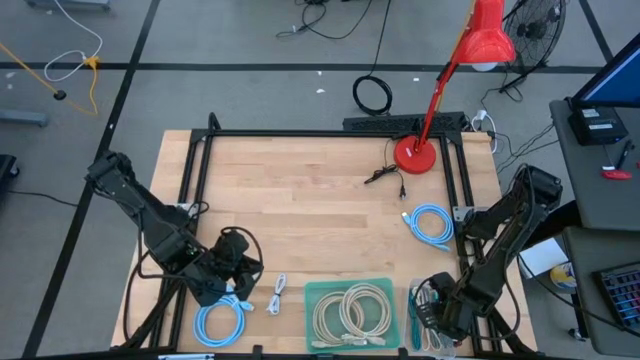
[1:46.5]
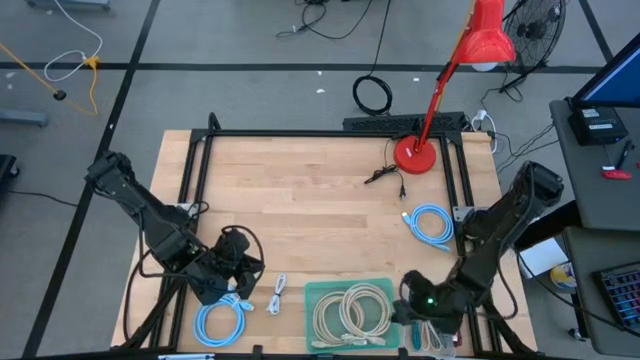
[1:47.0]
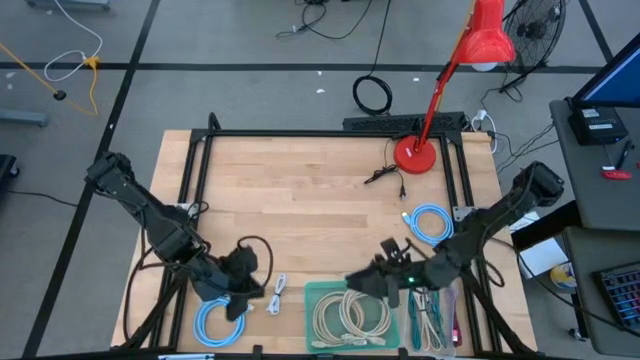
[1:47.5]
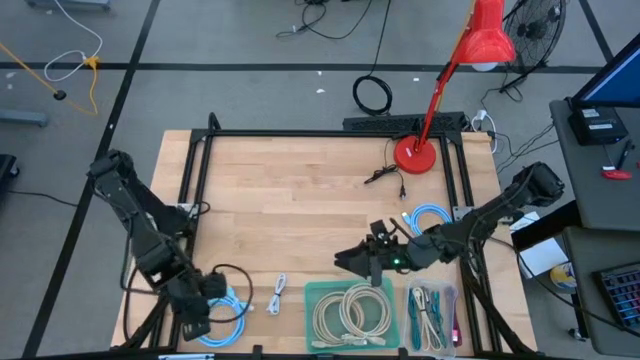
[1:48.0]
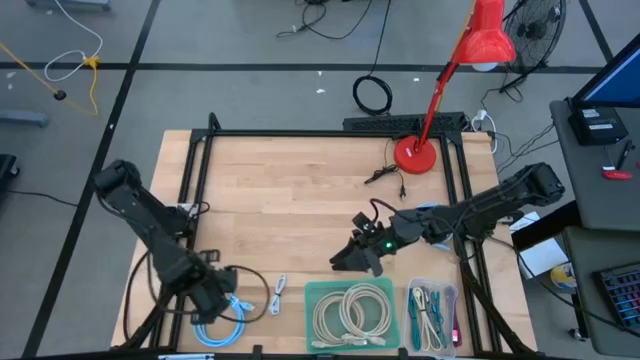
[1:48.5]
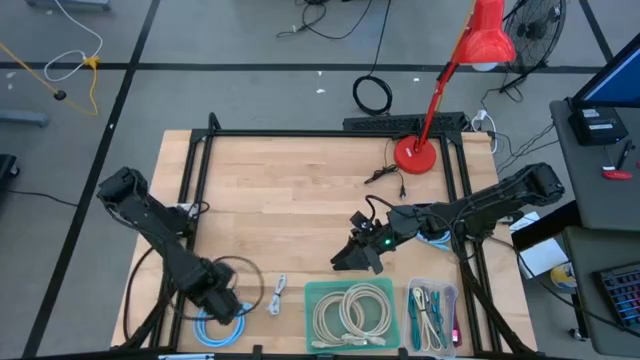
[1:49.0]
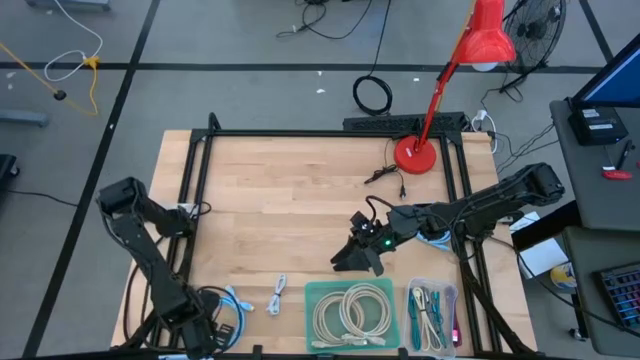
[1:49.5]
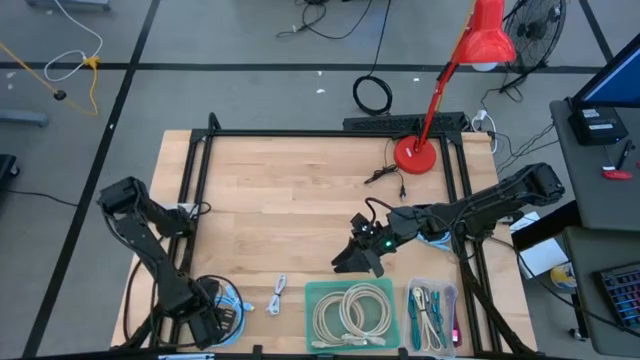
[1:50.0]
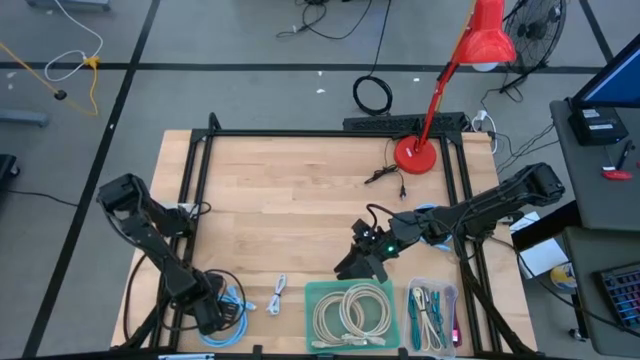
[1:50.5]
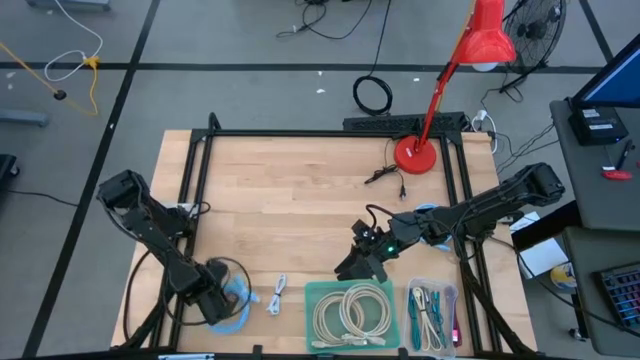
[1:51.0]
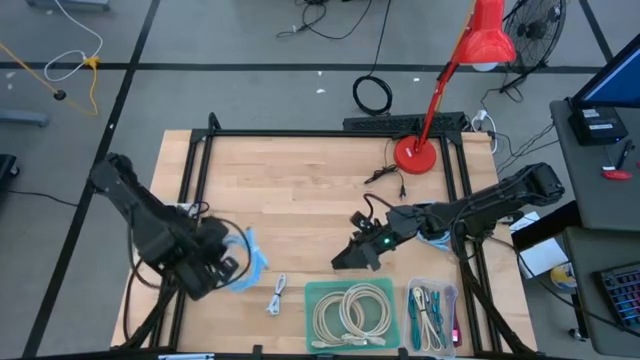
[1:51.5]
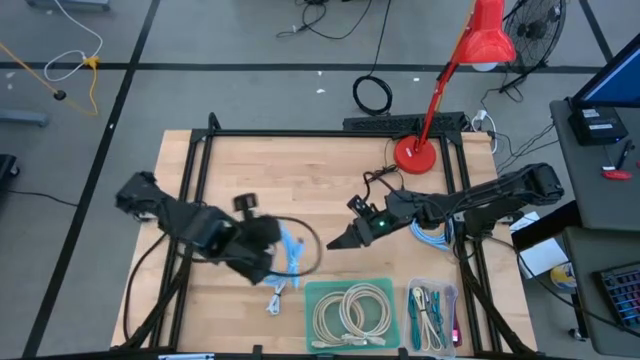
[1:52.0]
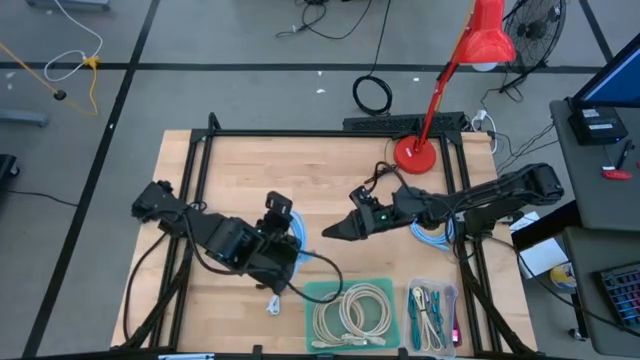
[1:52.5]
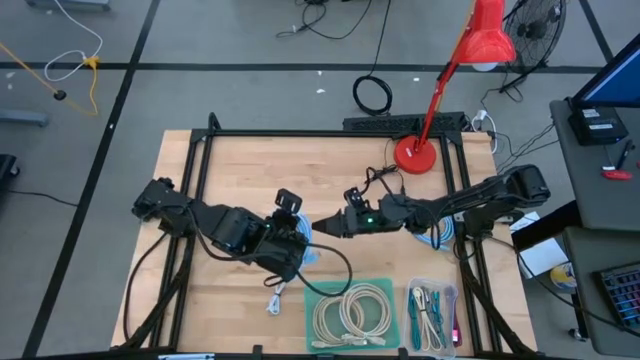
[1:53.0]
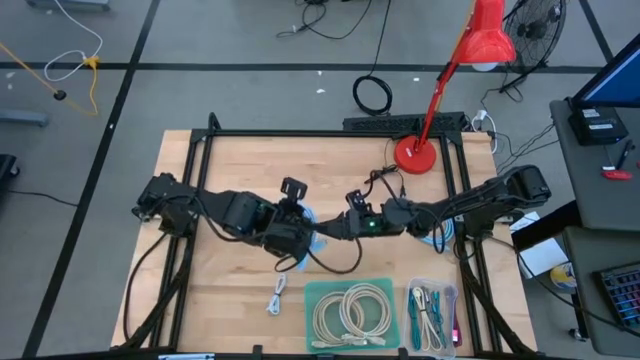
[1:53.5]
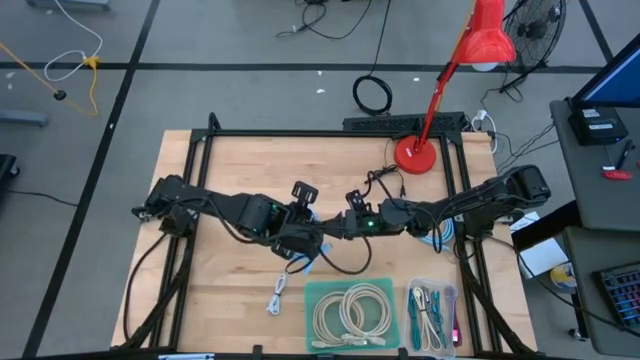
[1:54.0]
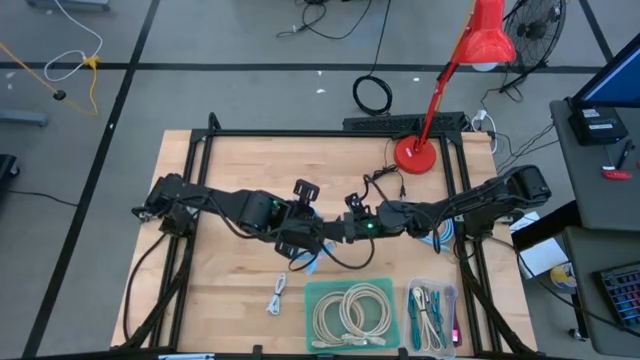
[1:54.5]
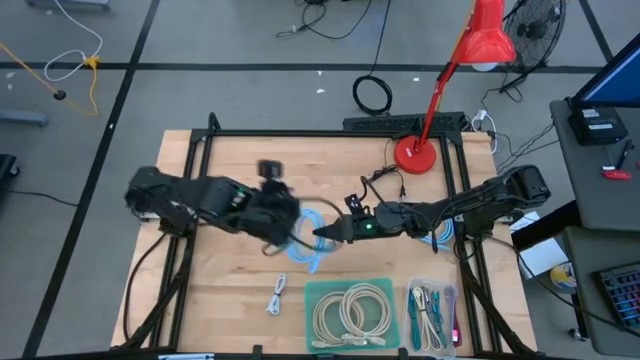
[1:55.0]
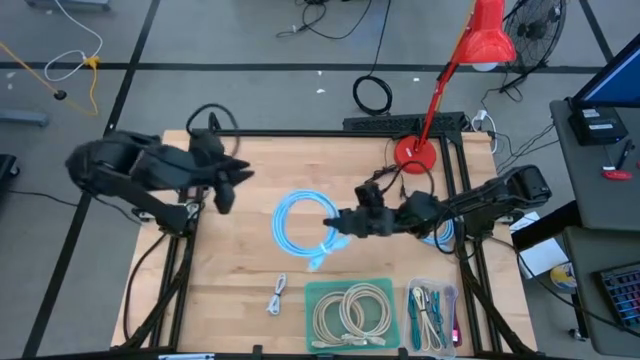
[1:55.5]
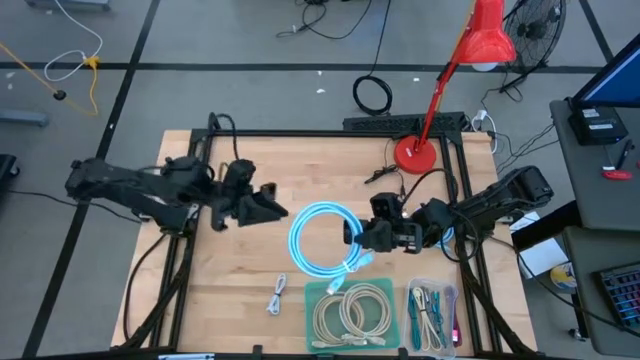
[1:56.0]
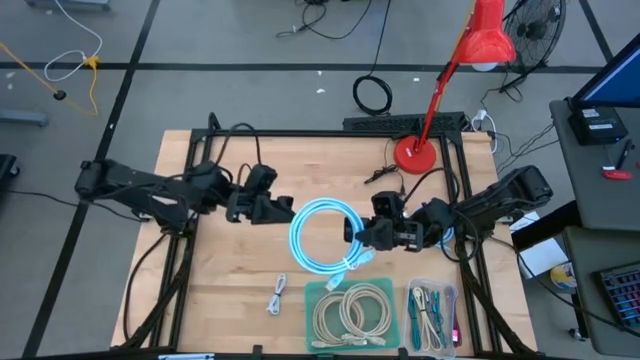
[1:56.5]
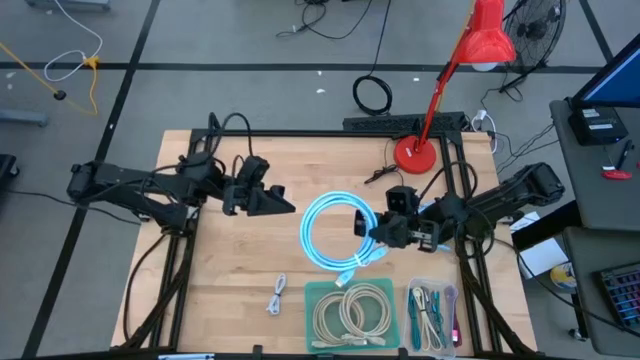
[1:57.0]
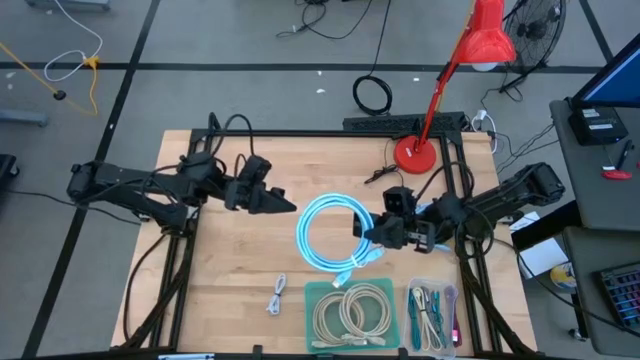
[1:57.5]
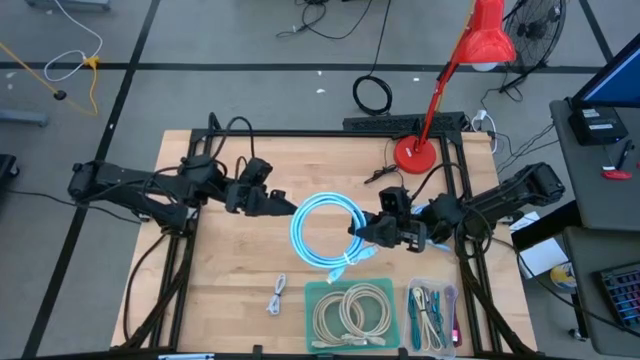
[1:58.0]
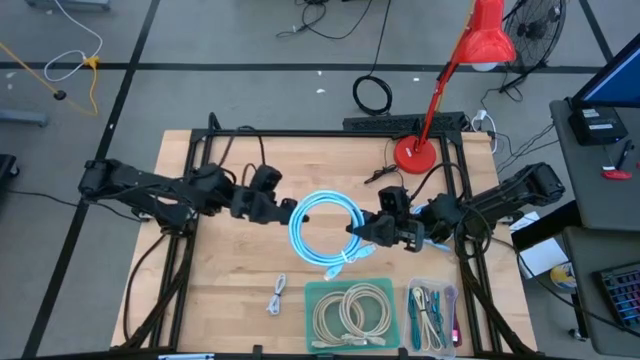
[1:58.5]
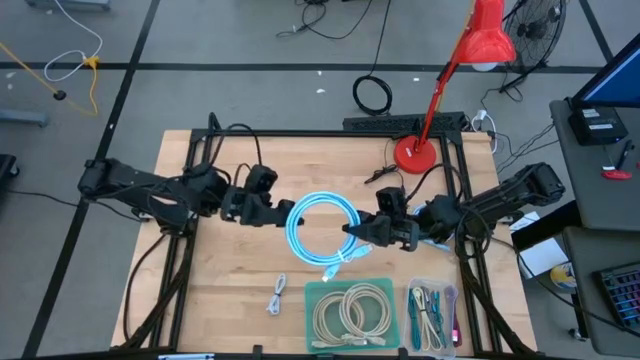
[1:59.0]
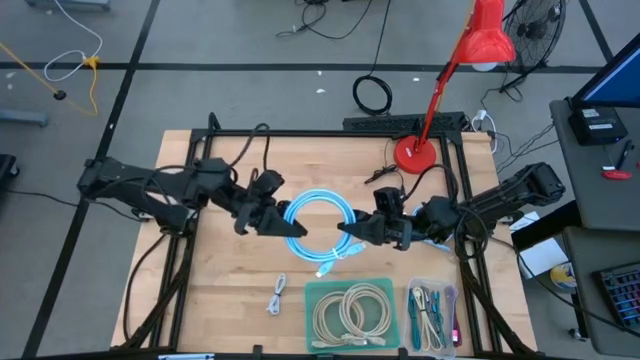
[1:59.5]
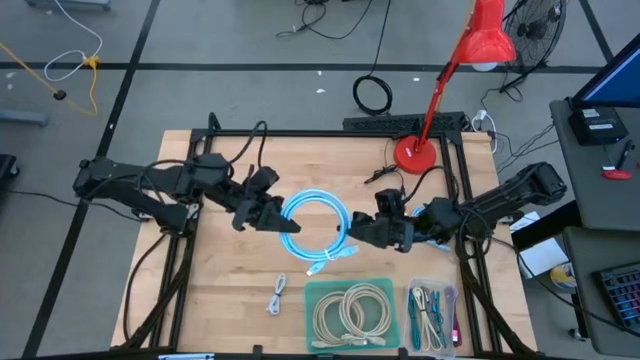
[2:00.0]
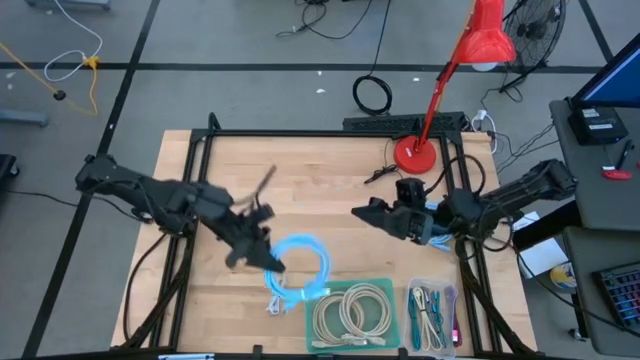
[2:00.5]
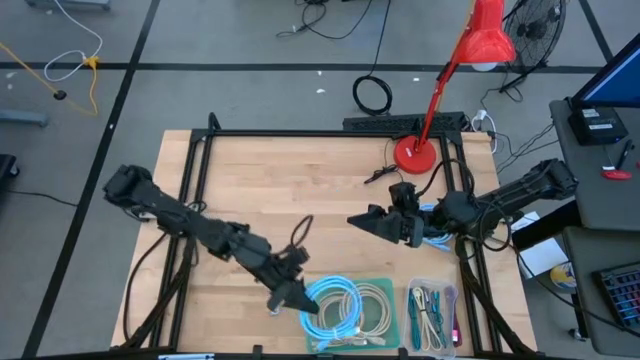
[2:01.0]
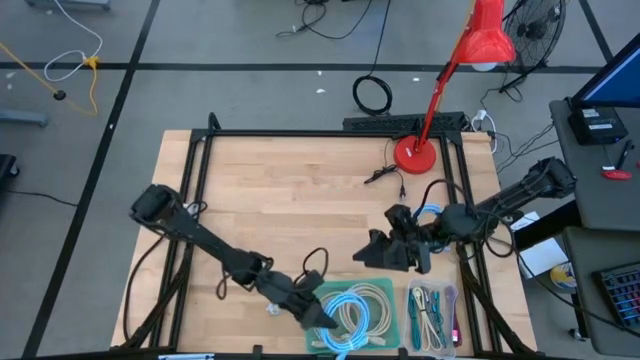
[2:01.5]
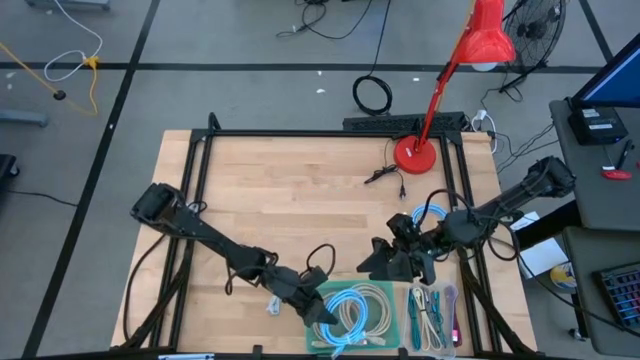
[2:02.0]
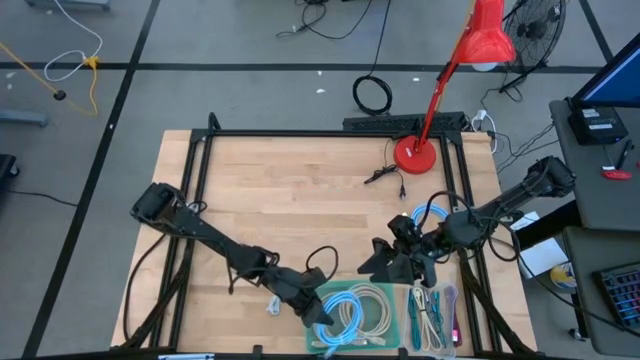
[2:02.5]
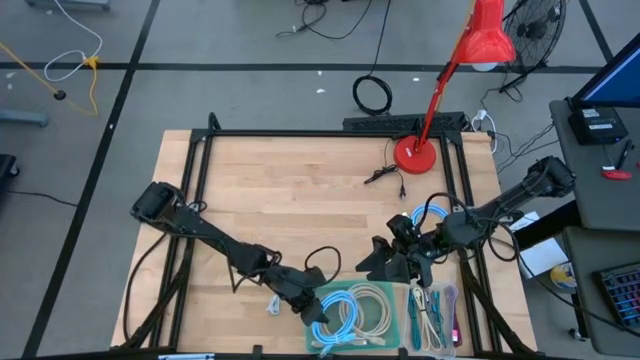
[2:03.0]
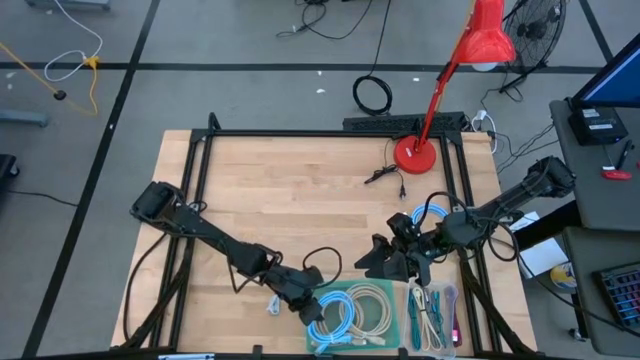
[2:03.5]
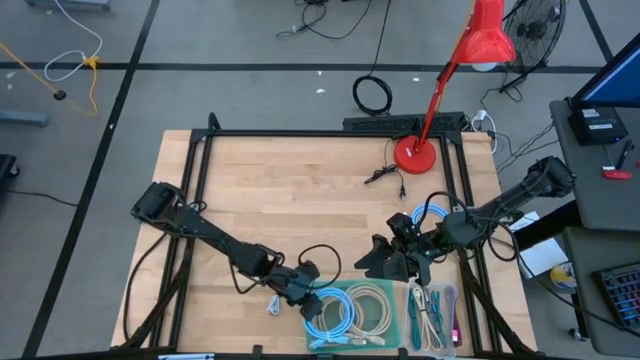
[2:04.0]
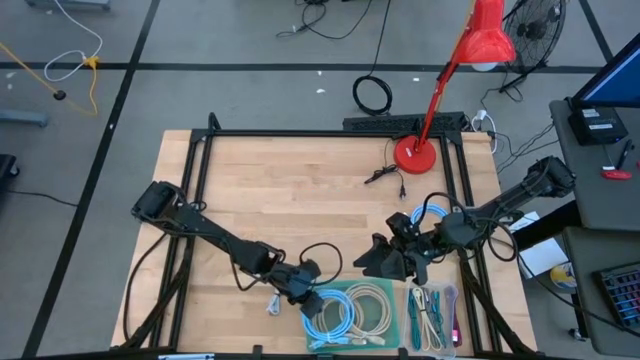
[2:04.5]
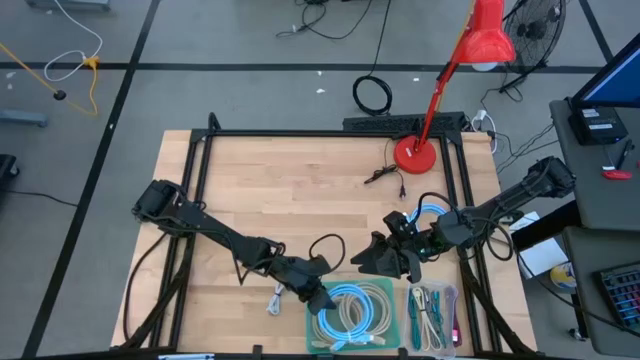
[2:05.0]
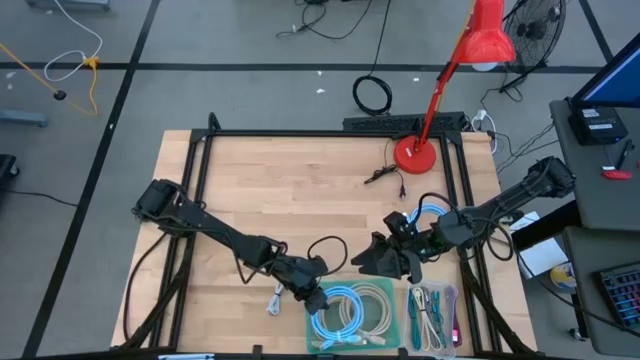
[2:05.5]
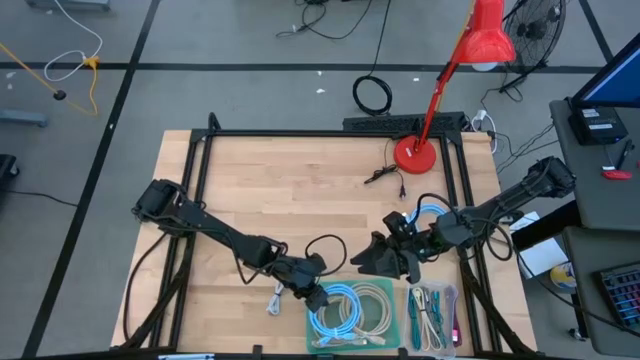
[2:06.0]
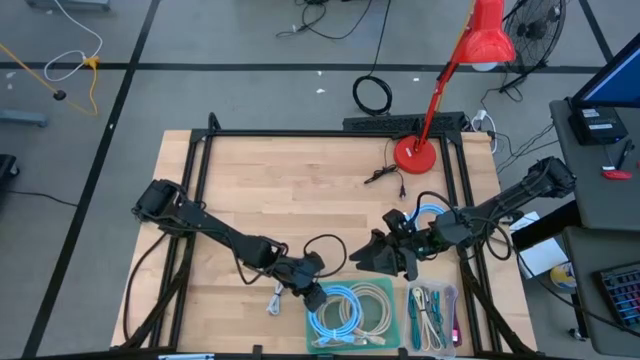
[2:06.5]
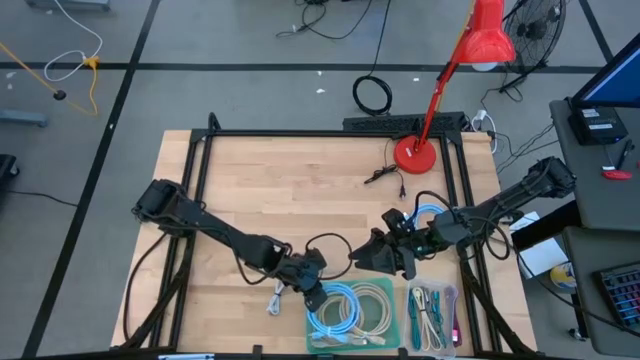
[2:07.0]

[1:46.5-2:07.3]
Task: Pick & Place USB Port
Put the left blue hdmi cable into the green bin
